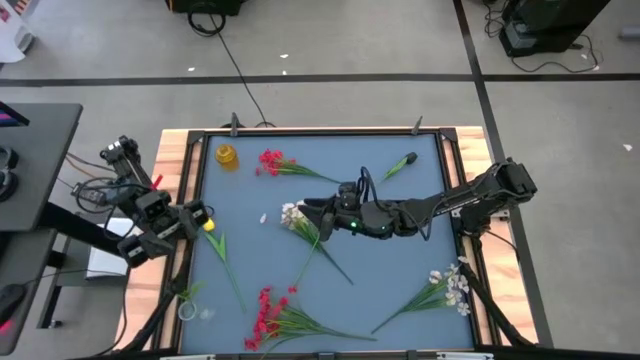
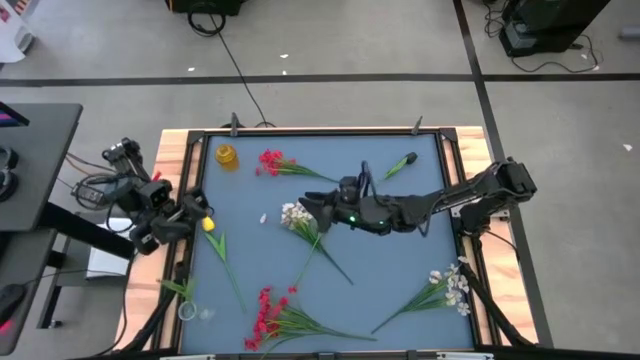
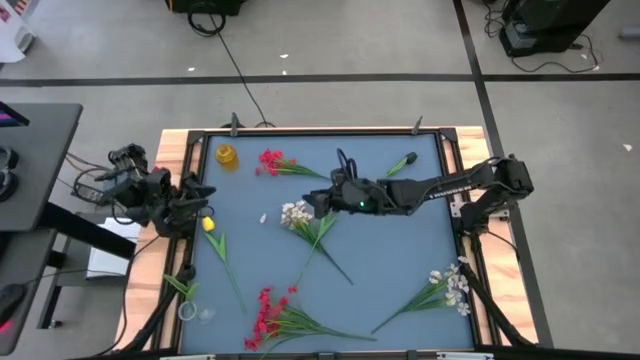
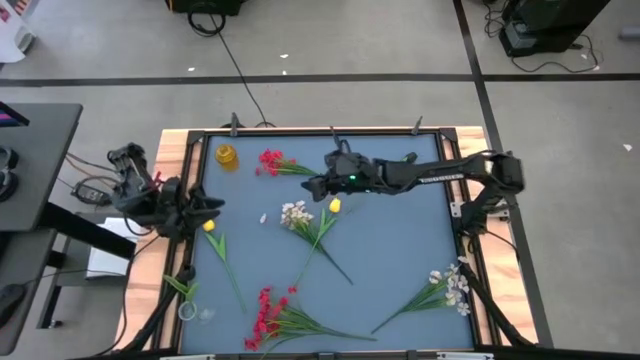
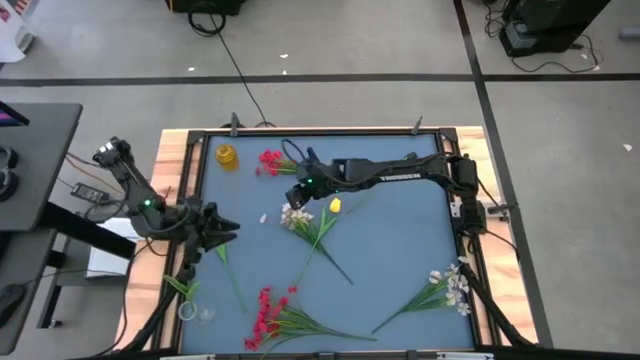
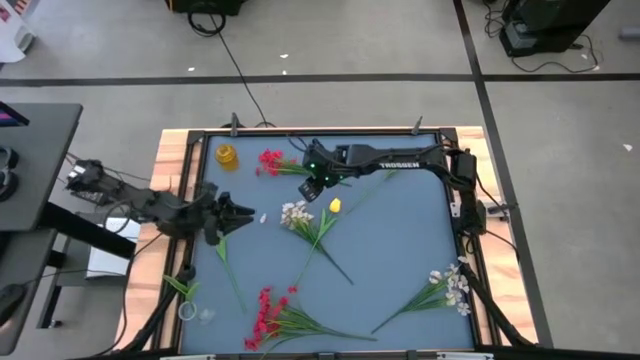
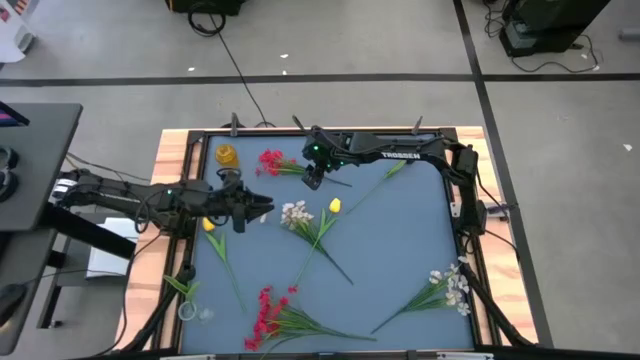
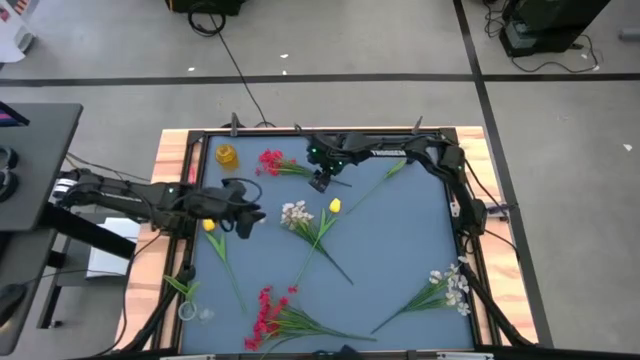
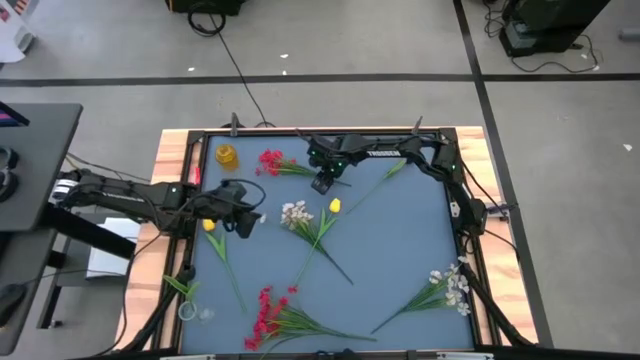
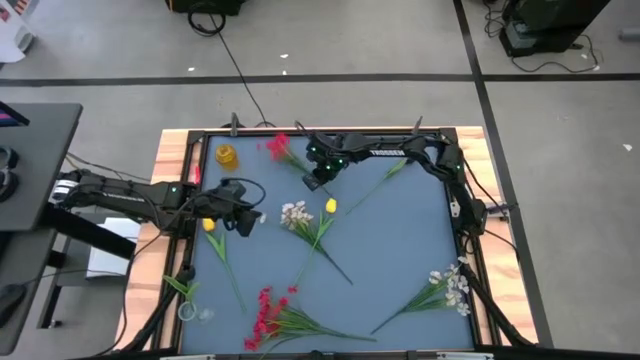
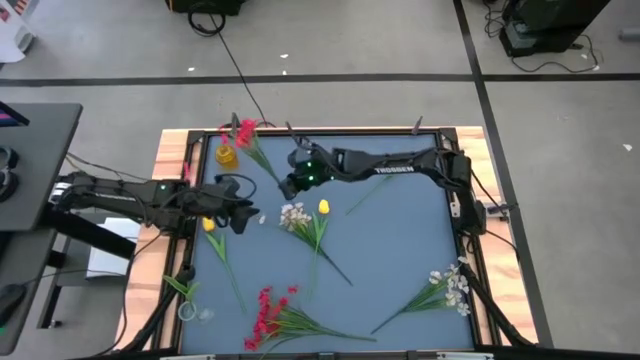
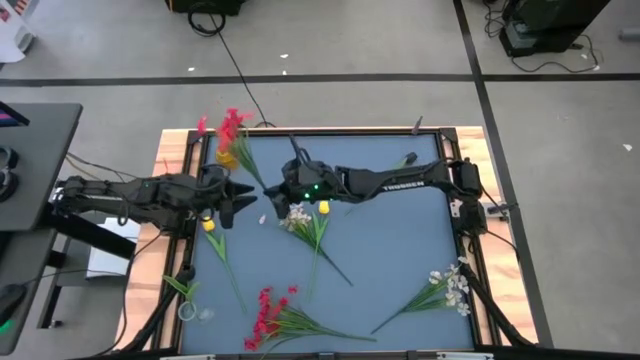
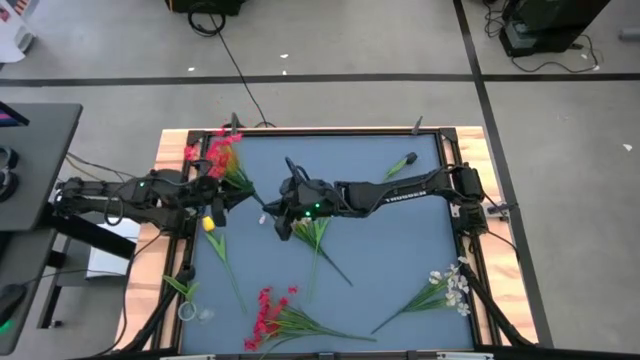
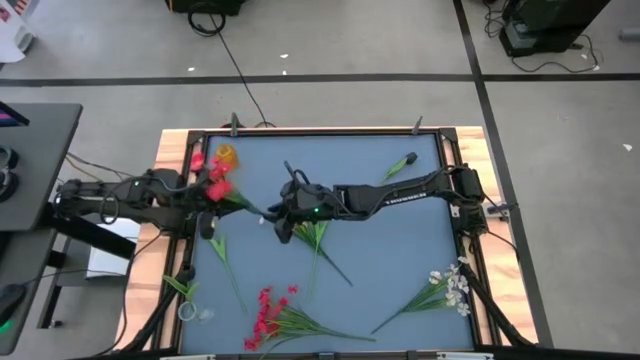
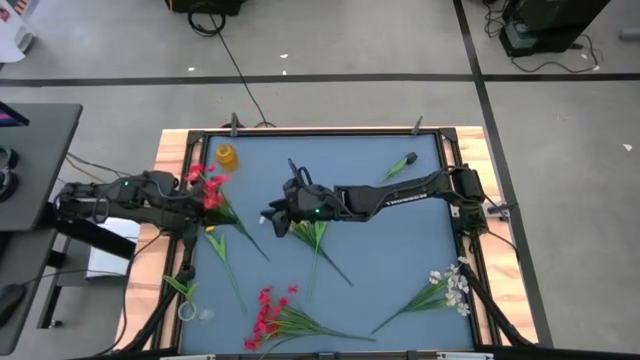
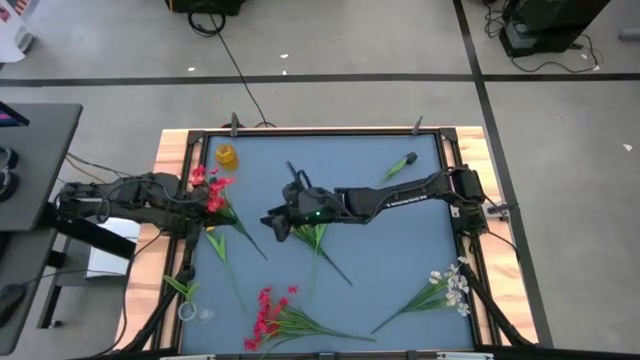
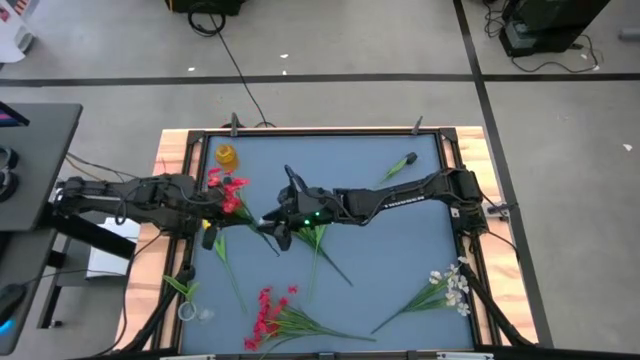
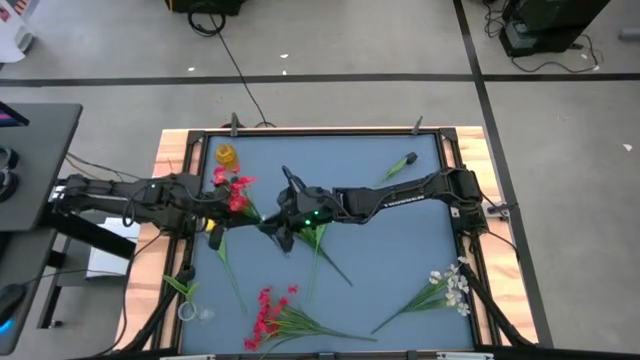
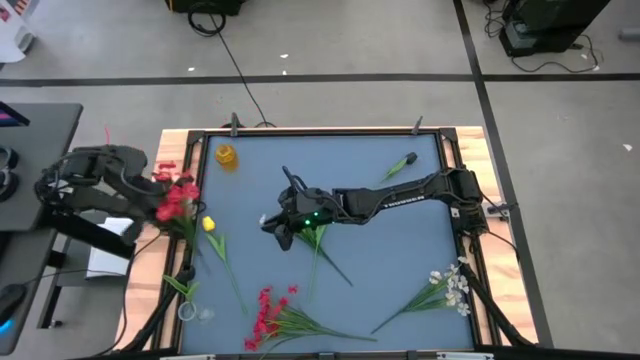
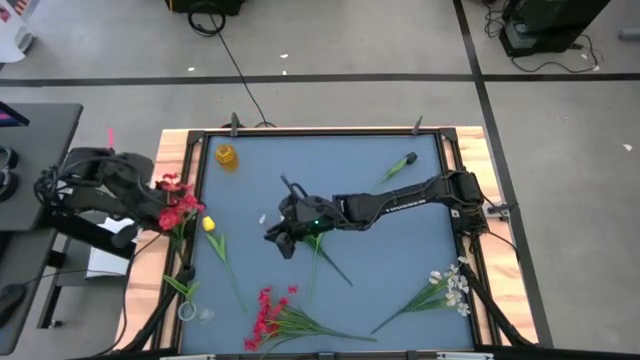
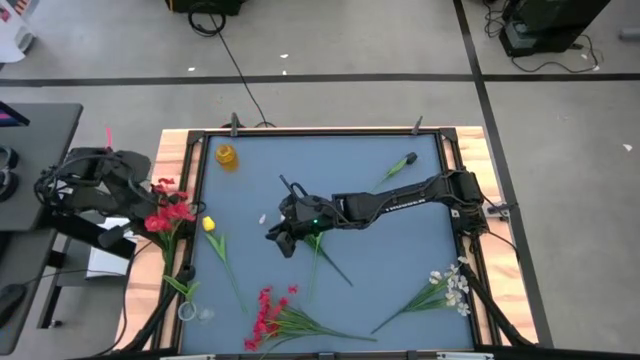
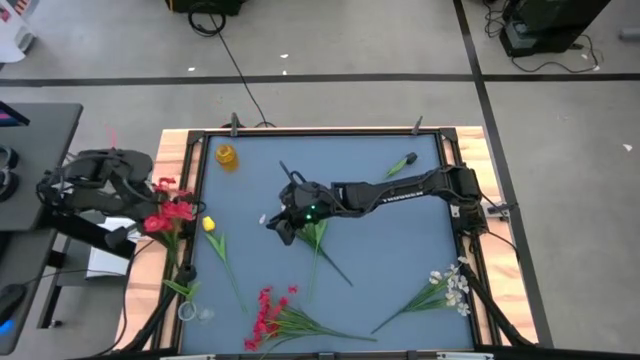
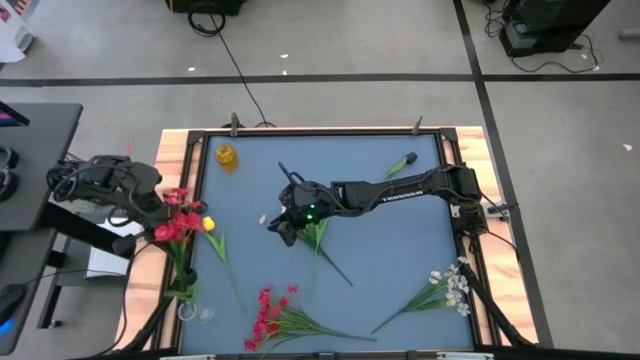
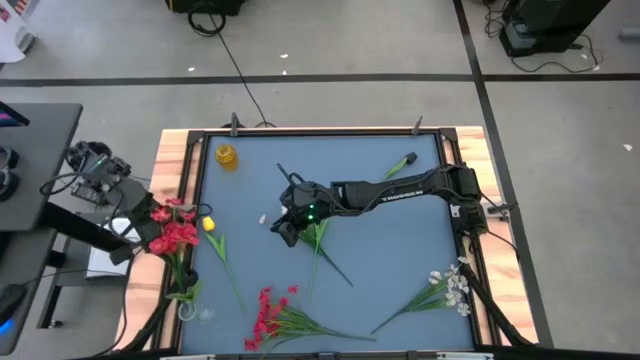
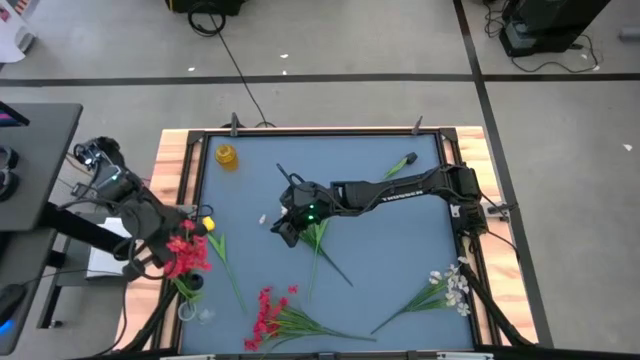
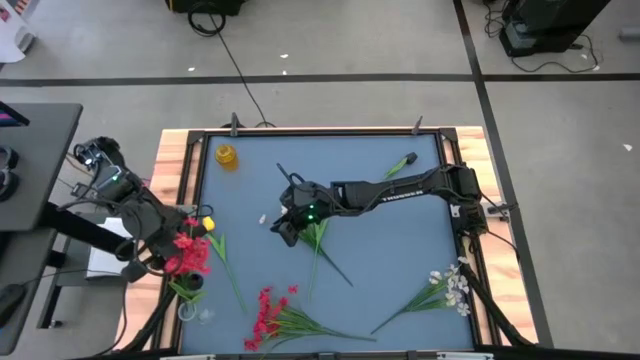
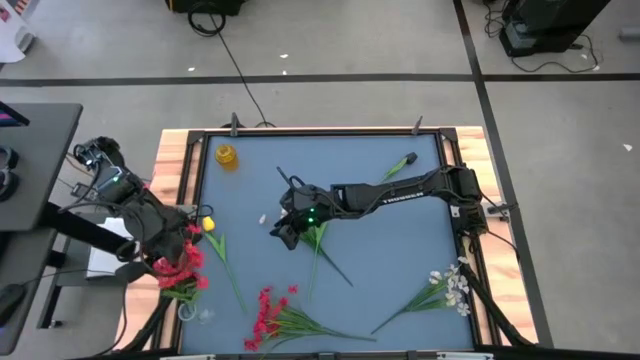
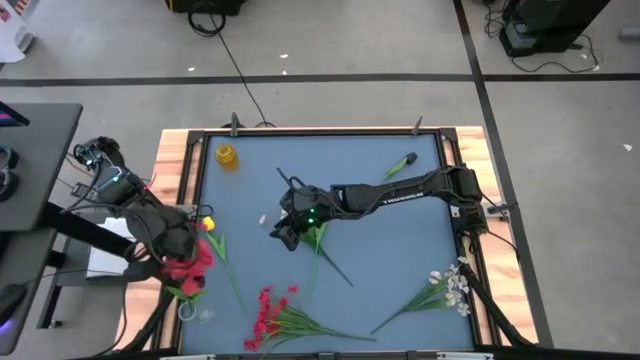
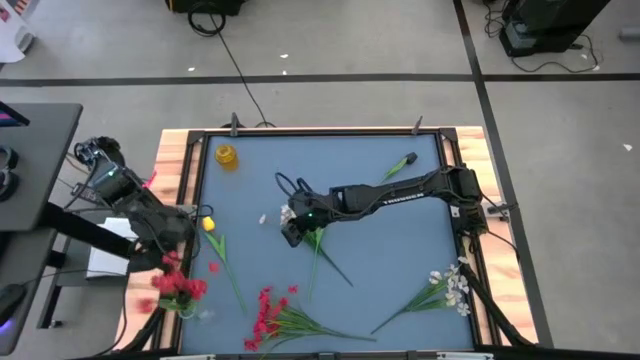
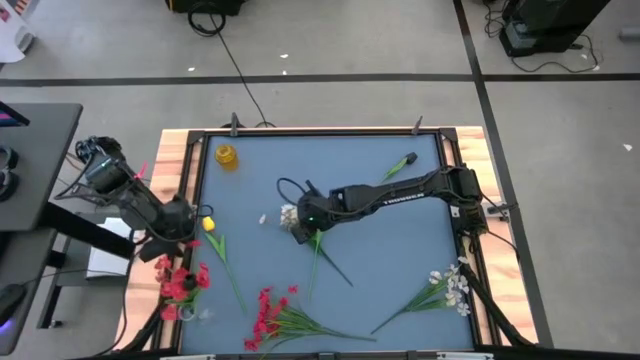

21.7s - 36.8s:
Task: Sort flowers into vase by color
Put the top red flowers into the transparent vase

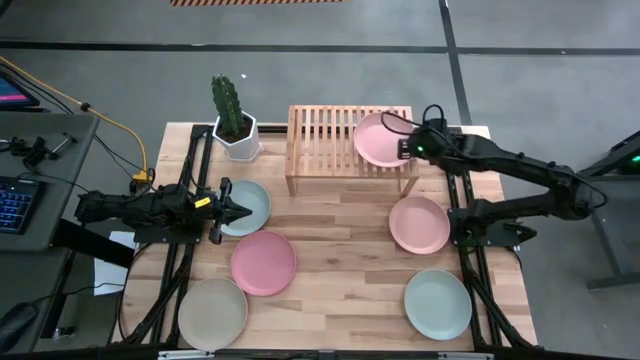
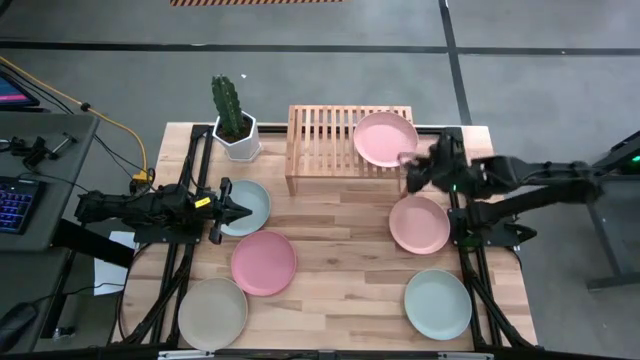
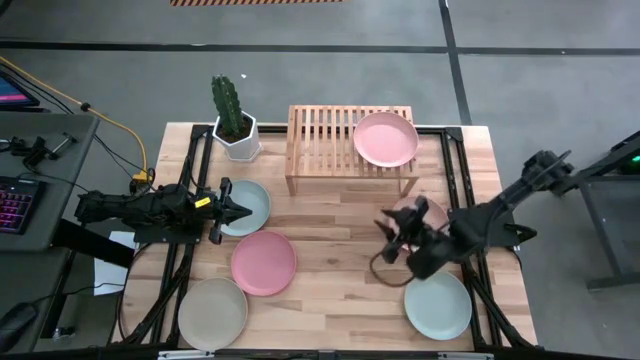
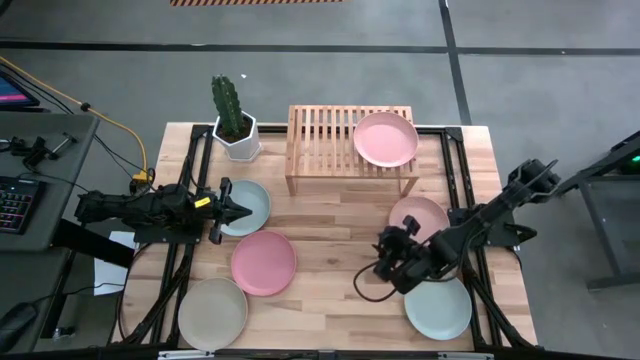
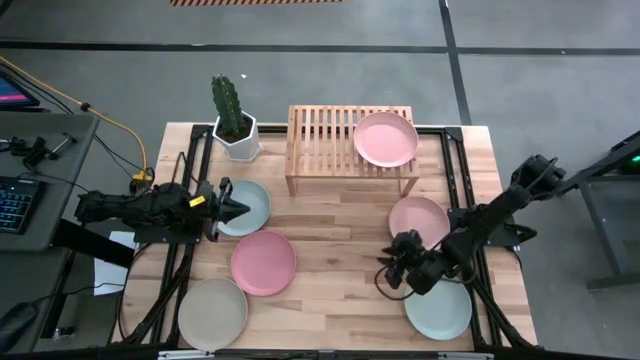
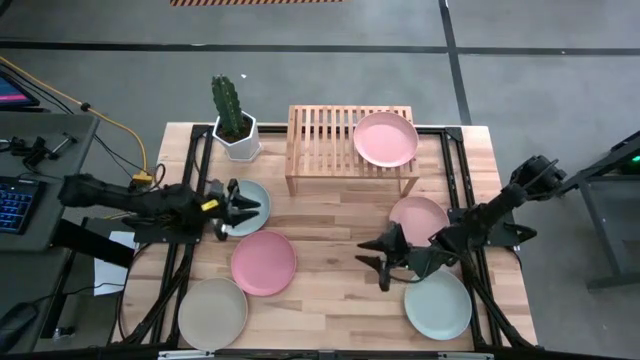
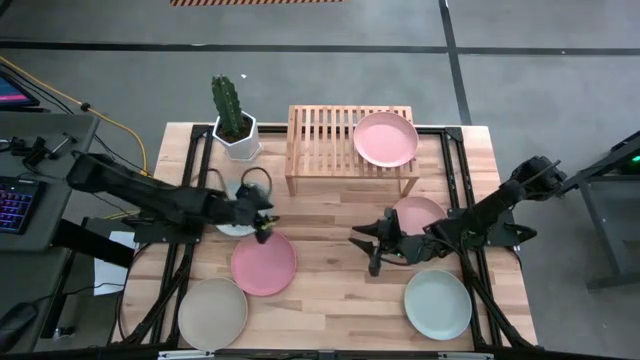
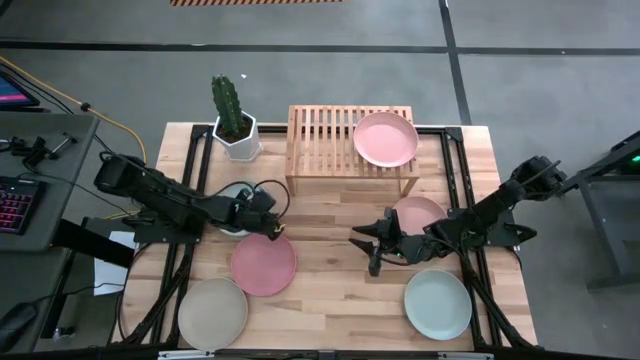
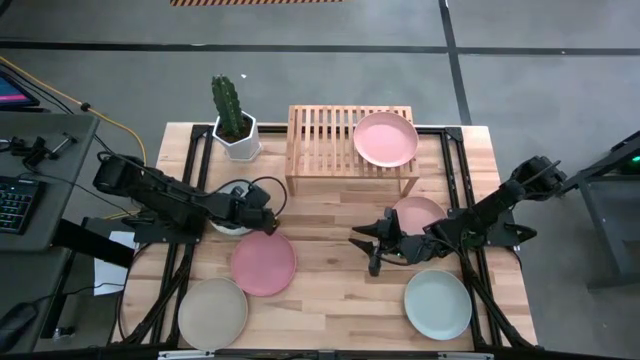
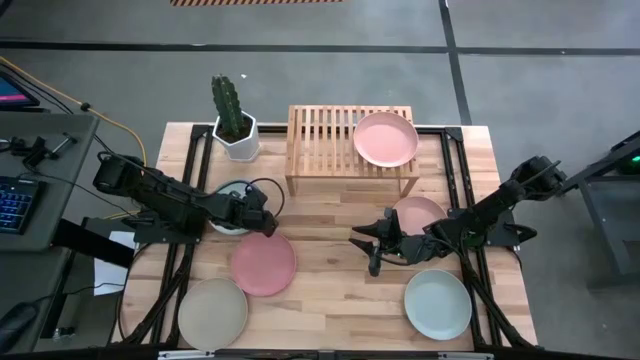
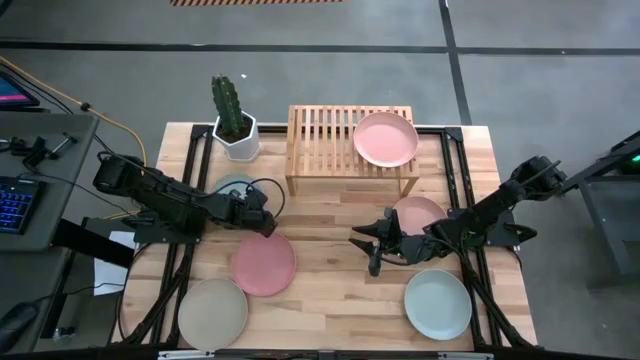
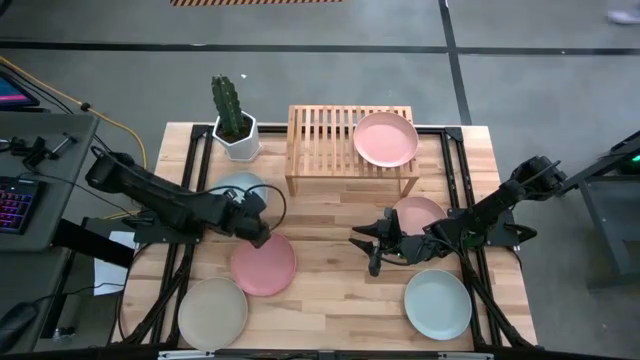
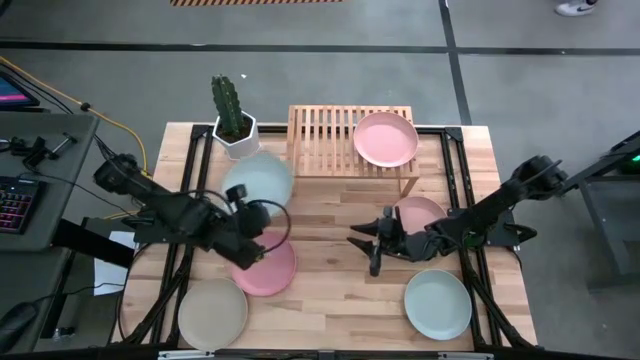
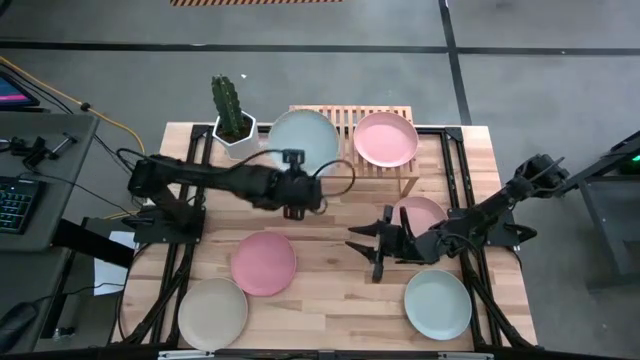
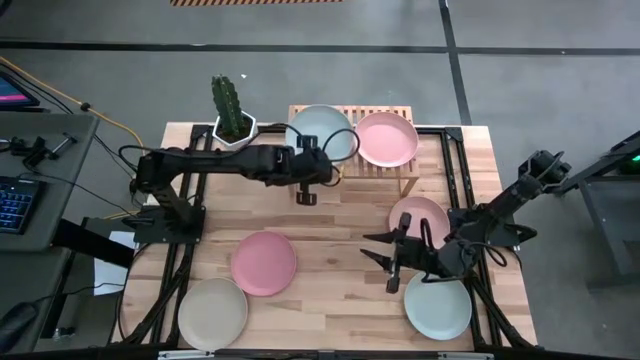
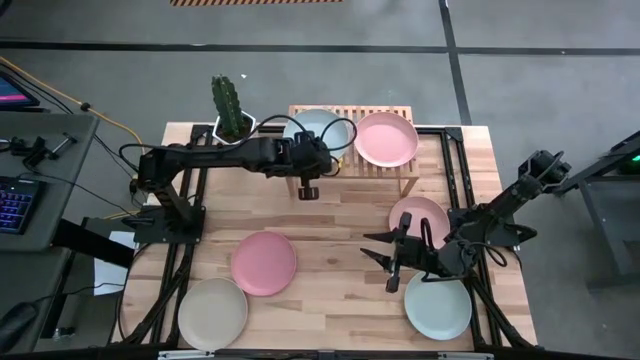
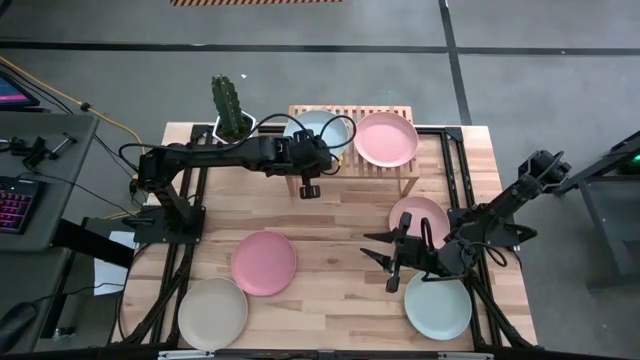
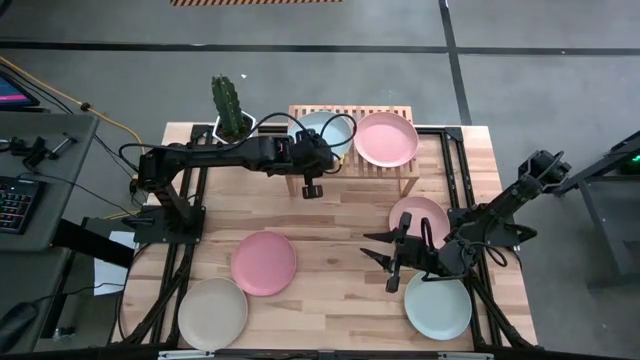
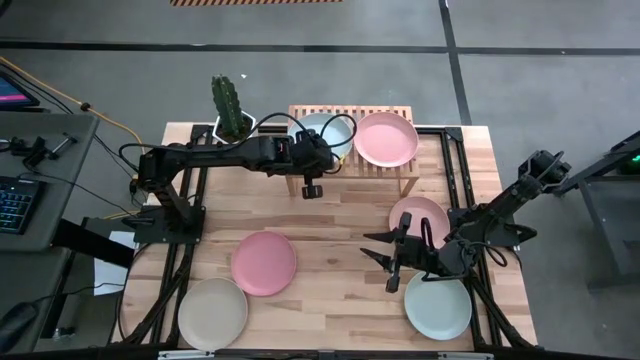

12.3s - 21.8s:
Task: Place and stack plates onto a shelf
Put the top blue plate on the shelf
